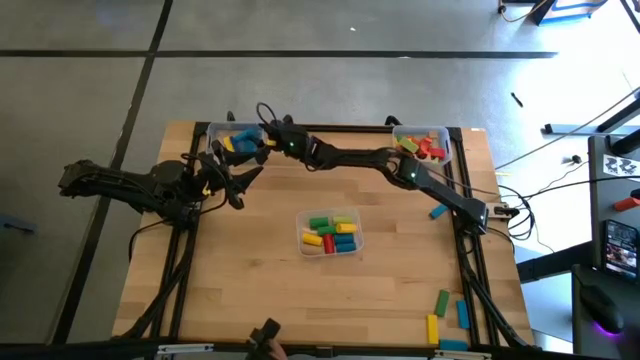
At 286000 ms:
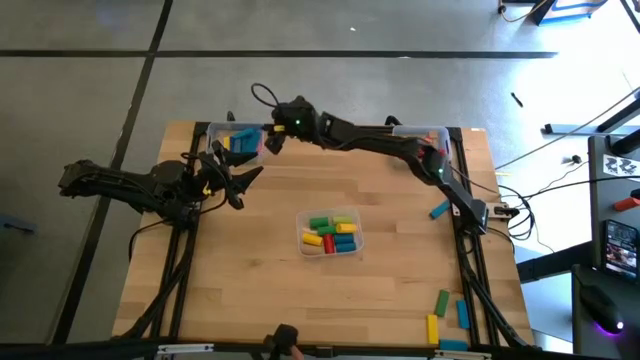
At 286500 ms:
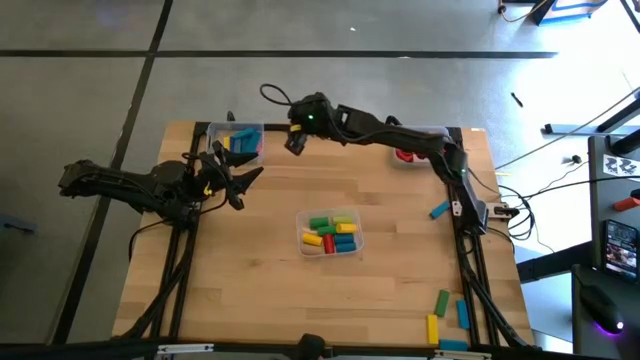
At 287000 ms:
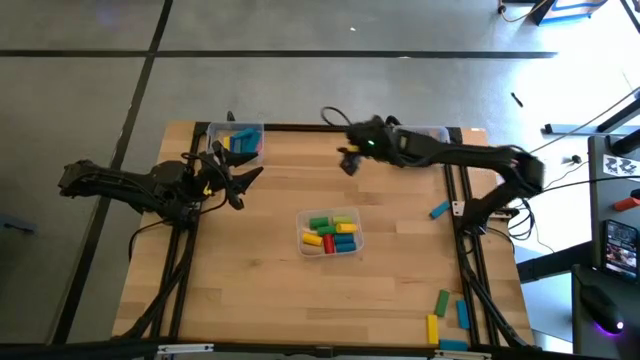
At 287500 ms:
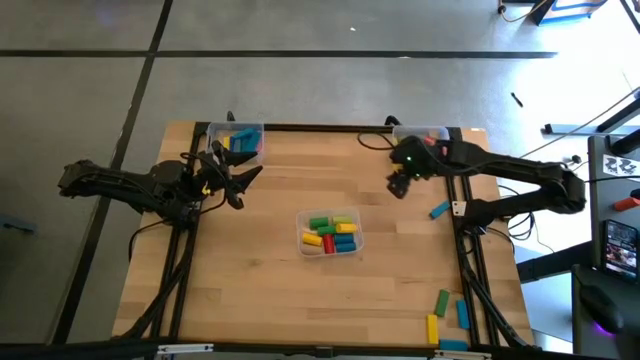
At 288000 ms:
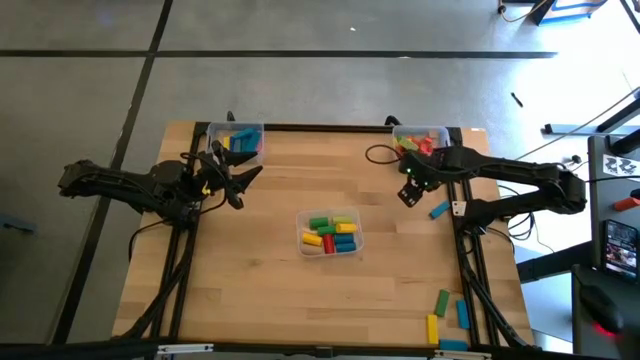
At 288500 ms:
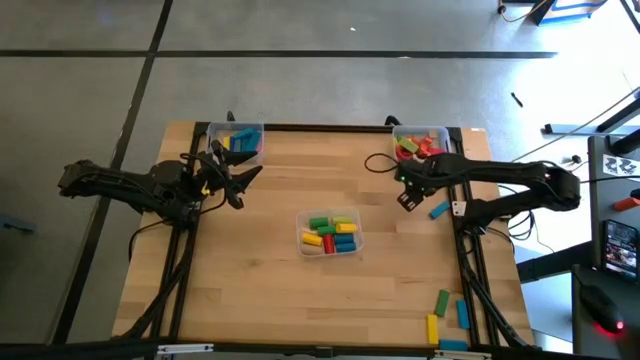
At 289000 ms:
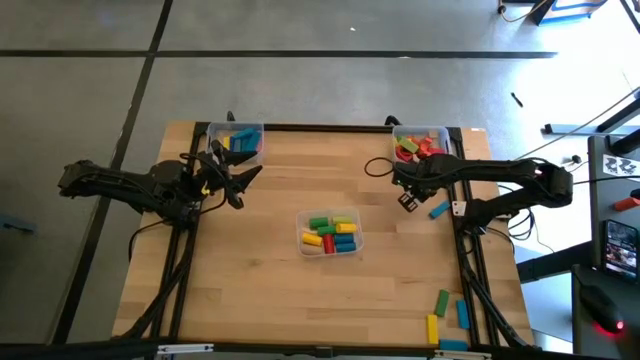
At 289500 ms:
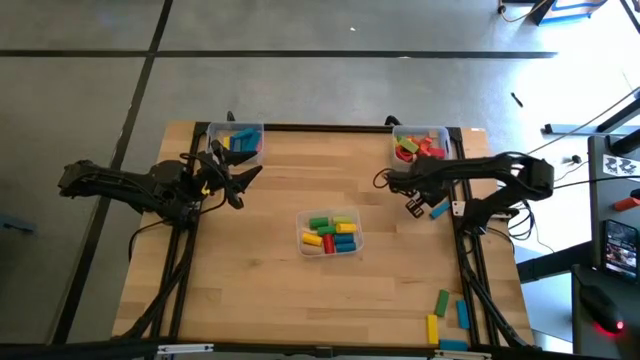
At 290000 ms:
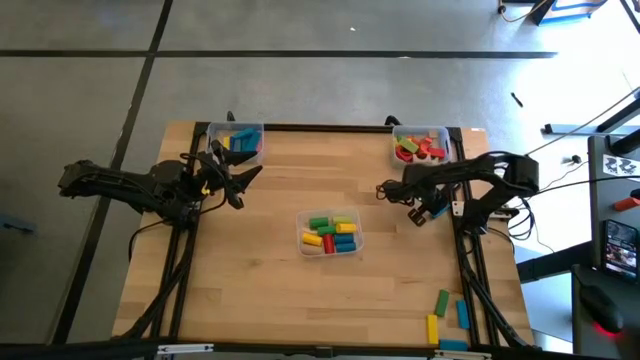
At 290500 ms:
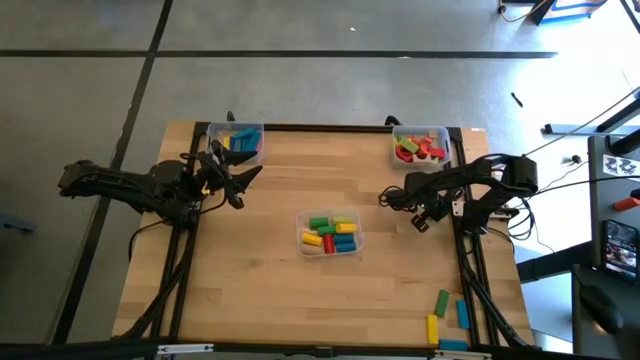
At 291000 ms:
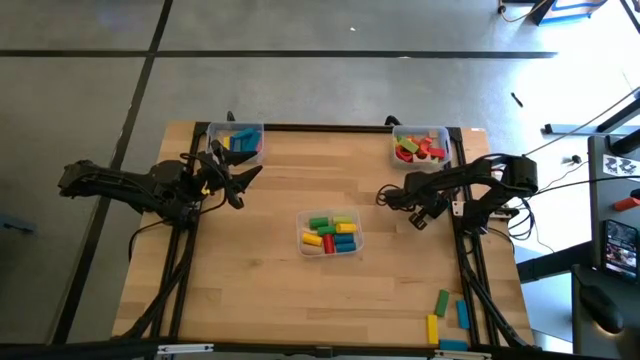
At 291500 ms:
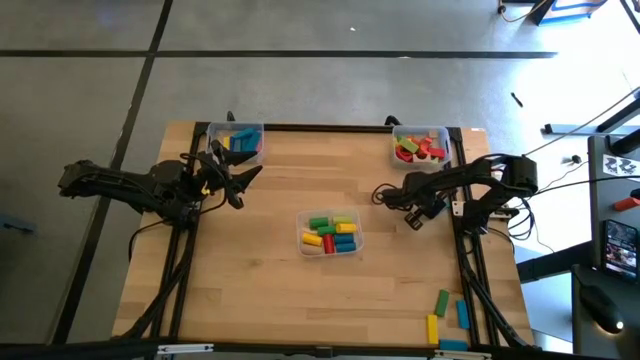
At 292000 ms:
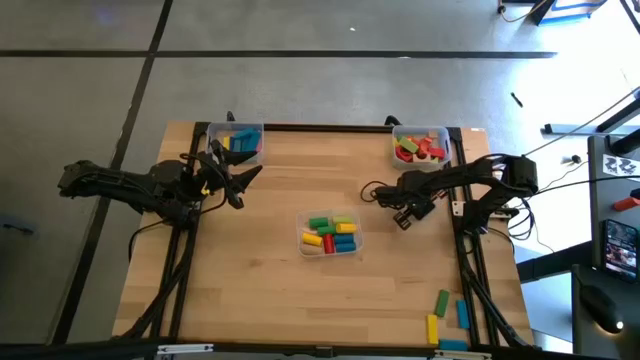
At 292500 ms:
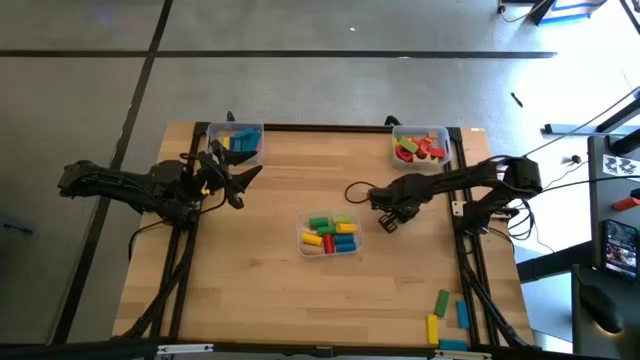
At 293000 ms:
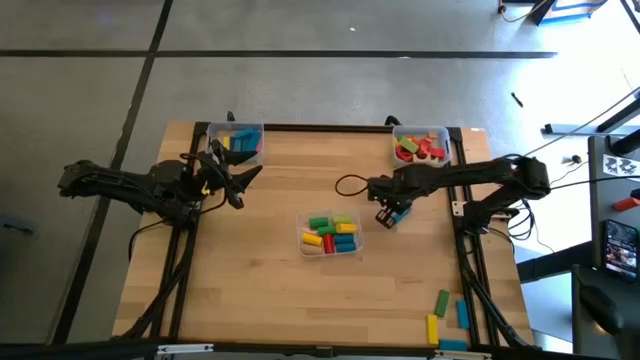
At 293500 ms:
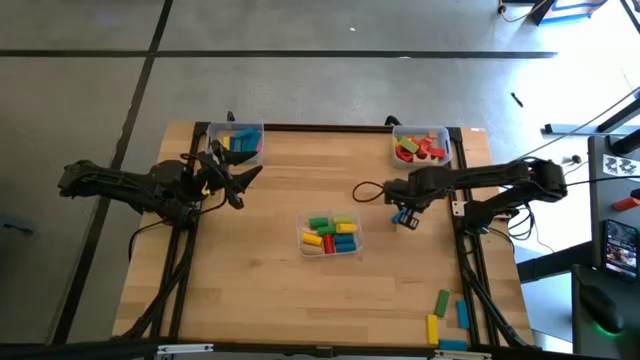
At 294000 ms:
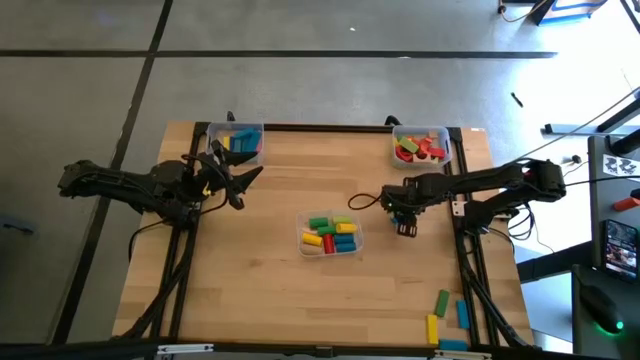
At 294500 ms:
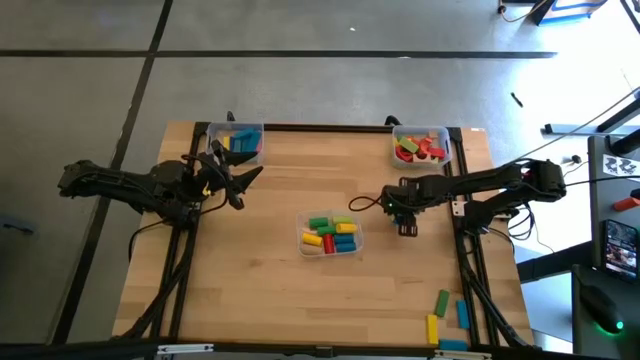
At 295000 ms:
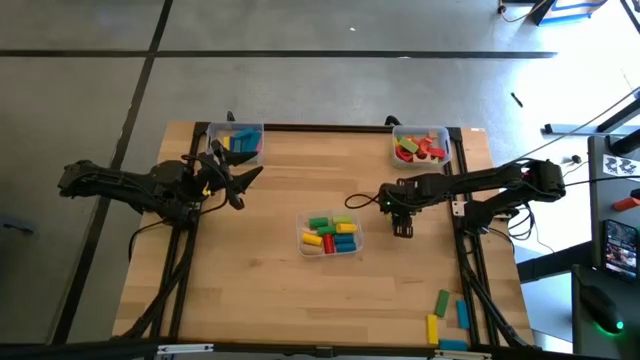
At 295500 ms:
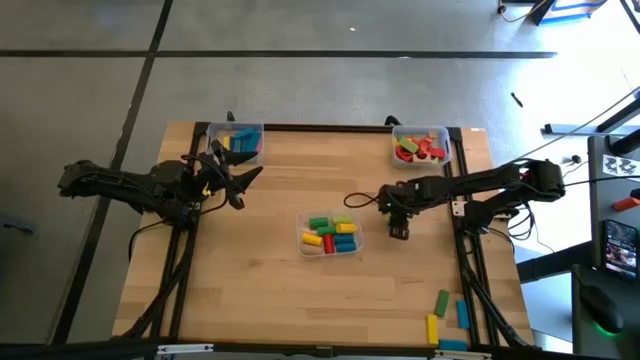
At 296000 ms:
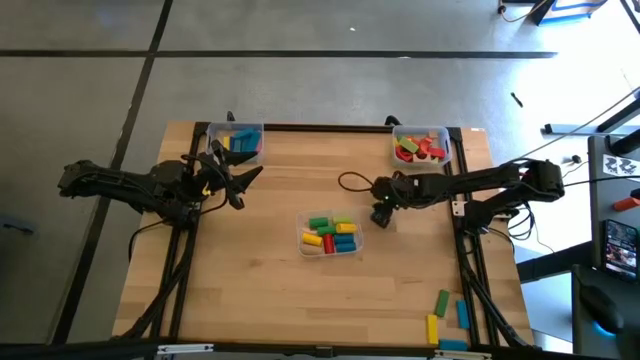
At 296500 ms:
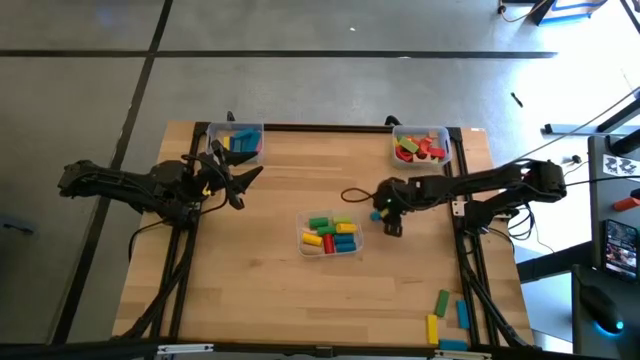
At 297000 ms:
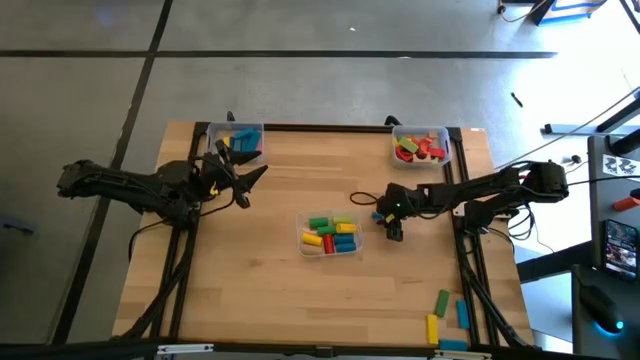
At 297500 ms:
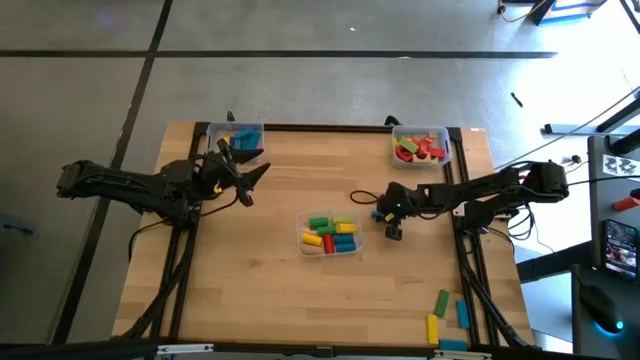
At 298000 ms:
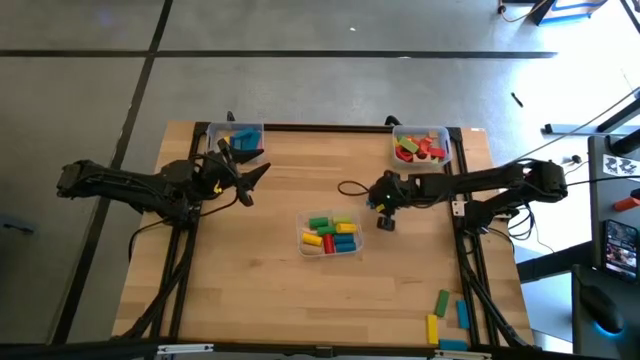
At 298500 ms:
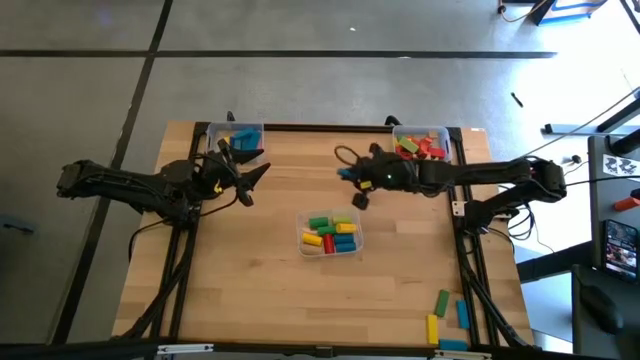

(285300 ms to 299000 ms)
Task: Sort blocks by size
Put the blue rectangular block into the top left transparent bin

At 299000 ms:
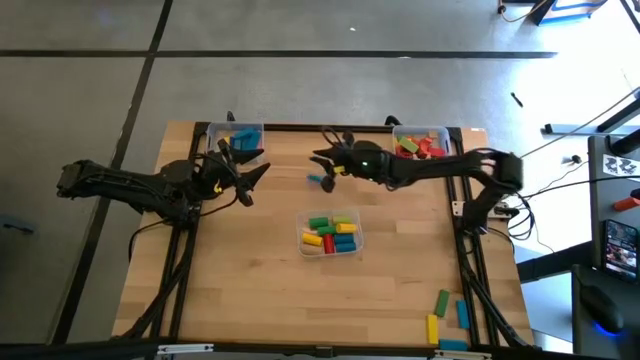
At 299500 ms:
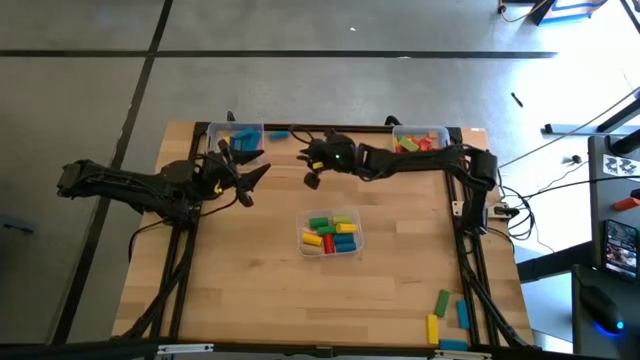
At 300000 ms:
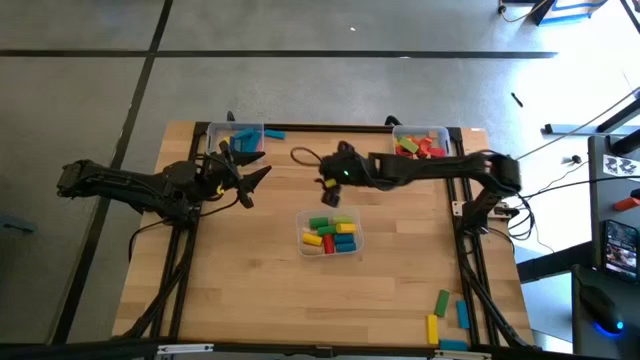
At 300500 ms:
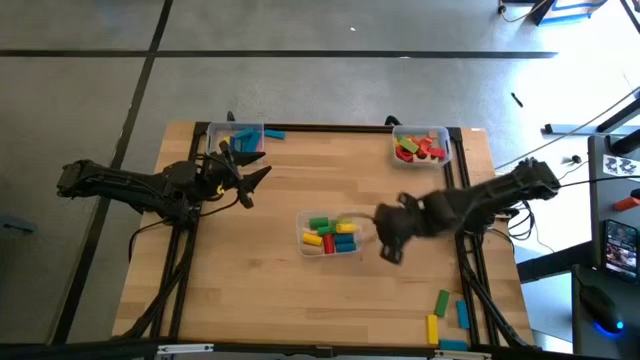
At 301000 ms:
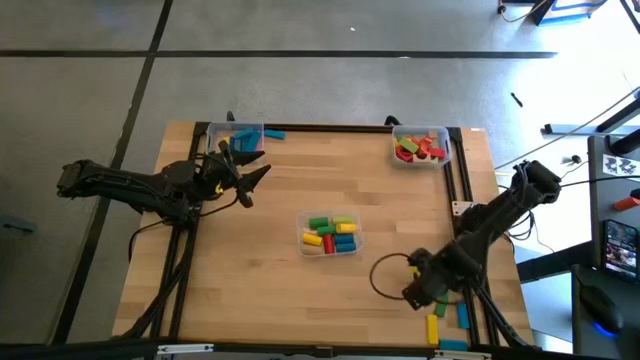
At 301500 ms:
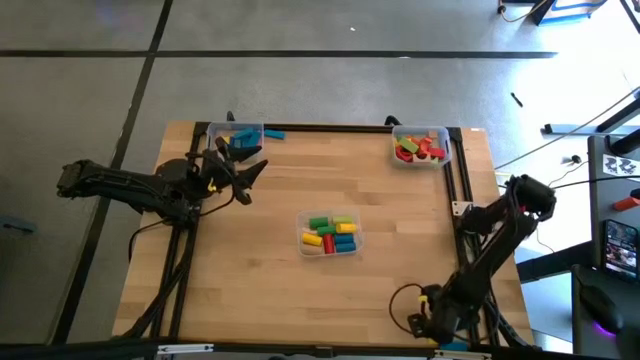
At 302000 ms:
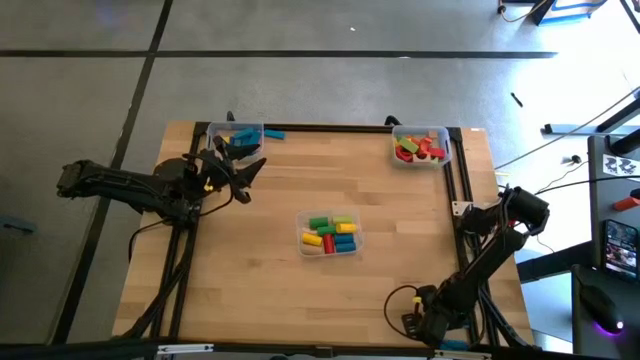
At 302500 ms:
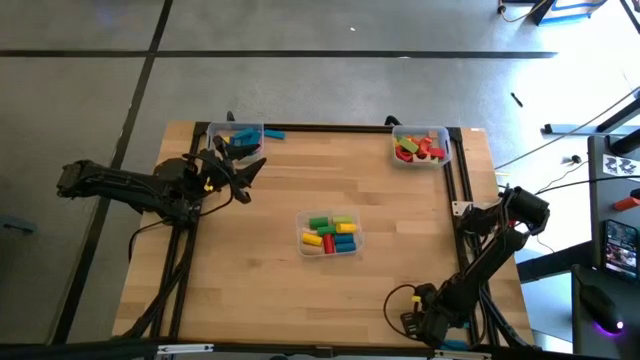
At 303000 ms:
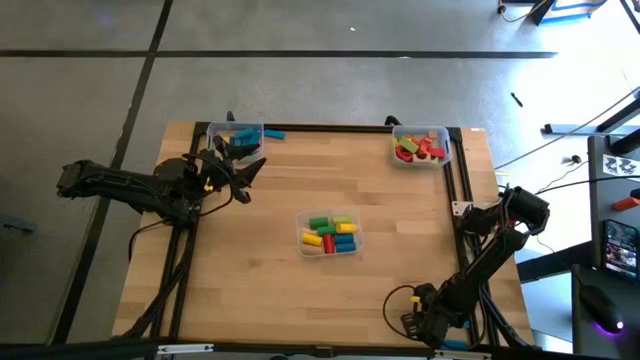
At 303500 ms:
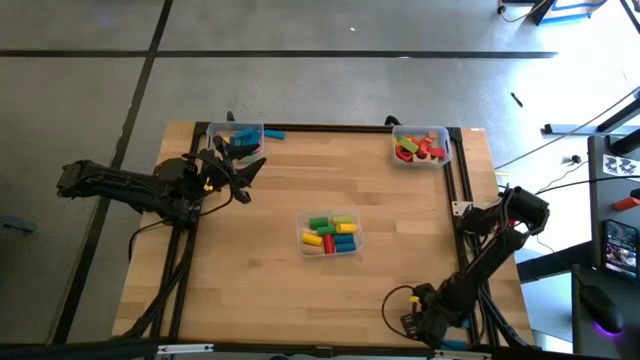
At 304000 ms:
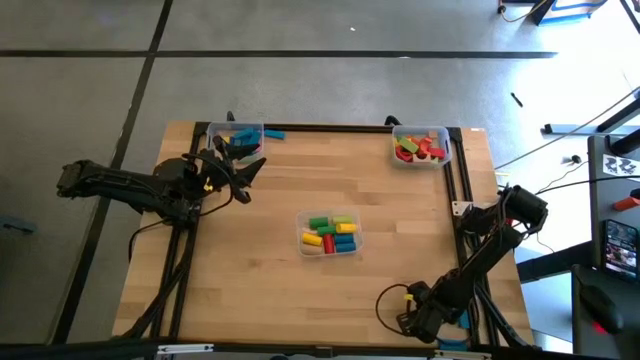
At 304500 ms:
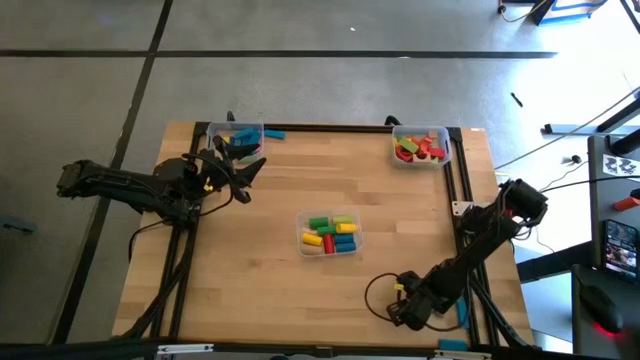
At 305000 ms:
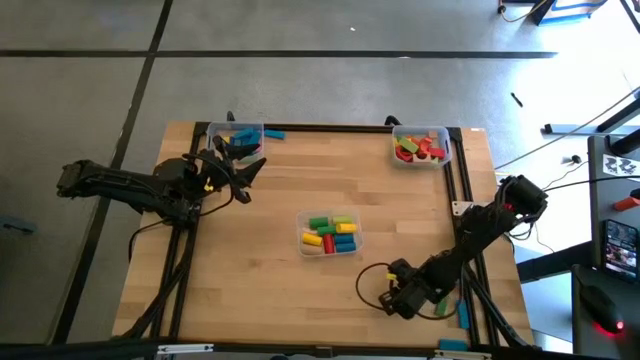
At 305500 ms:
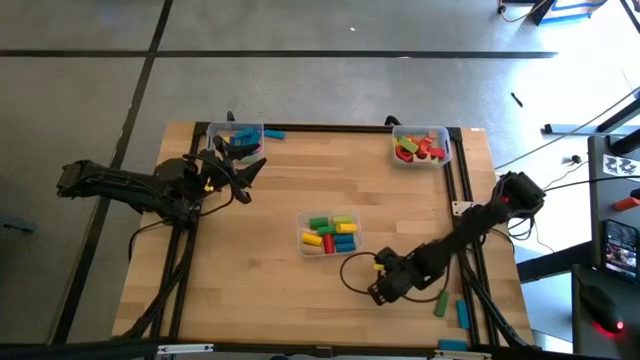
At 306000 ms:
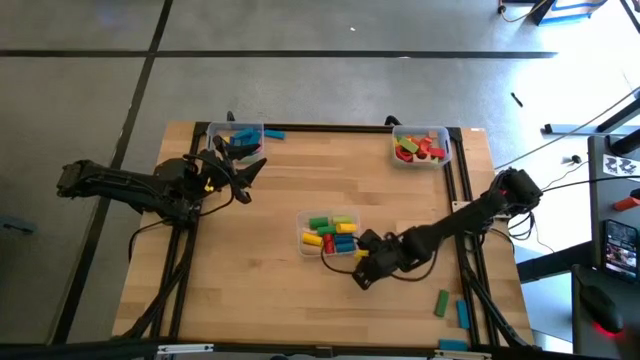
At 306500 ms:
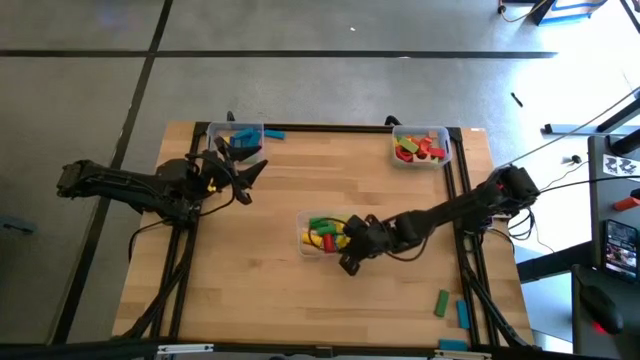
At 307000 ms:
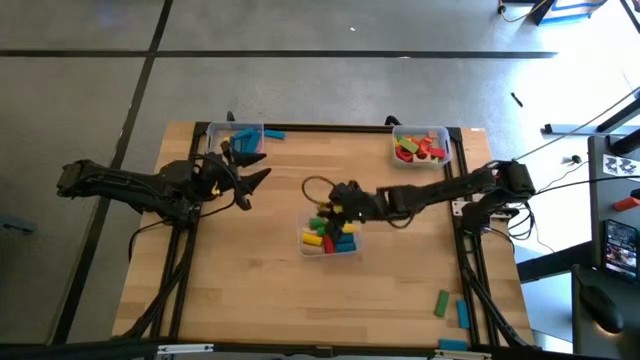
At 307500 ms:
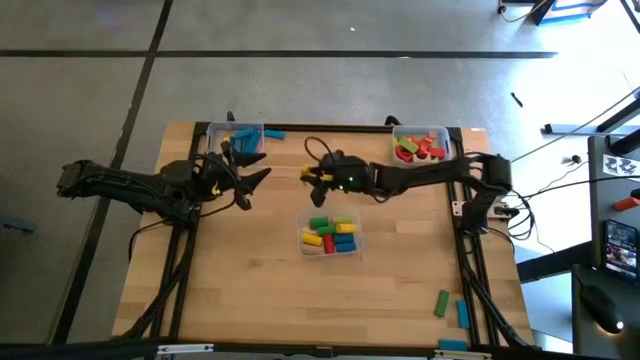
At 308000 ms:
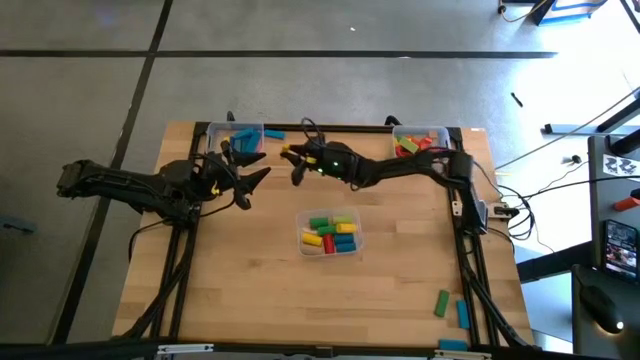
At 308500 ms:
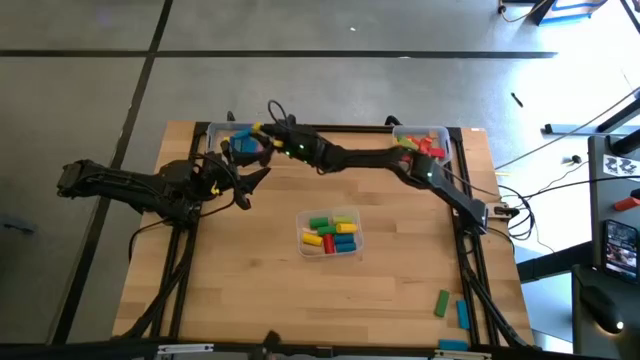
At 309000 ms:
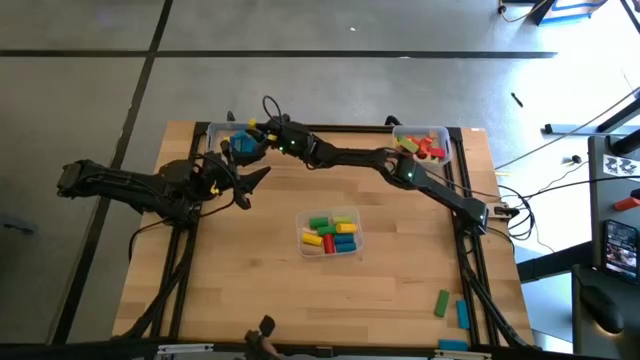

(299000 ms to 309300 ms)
Put the yellow rectangular block into the top left transparent bin
